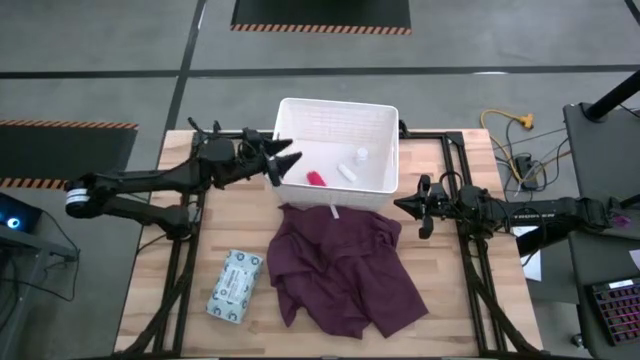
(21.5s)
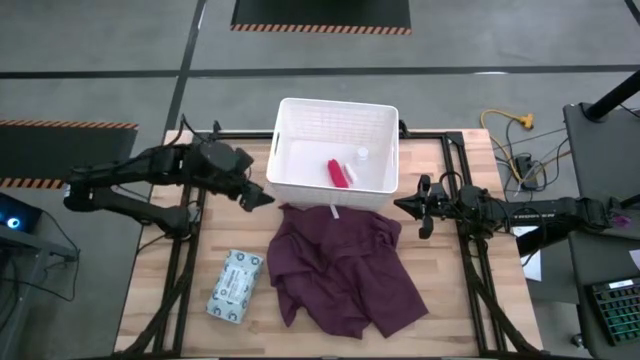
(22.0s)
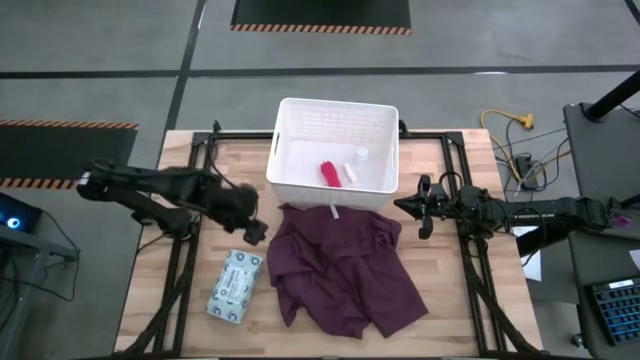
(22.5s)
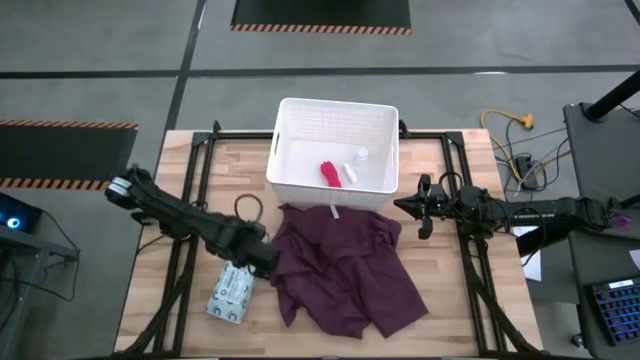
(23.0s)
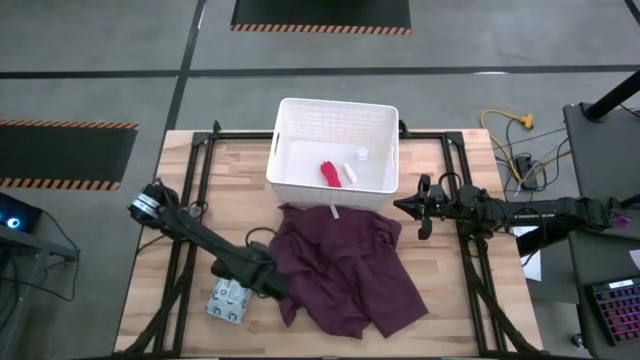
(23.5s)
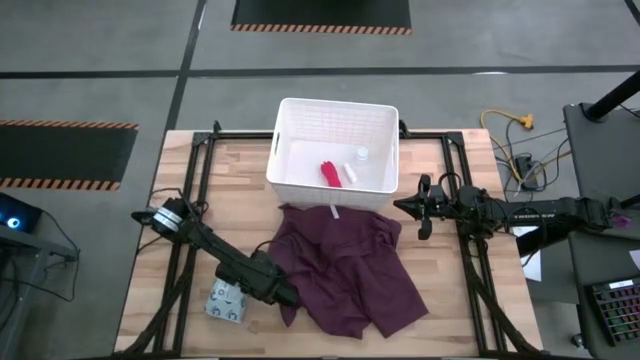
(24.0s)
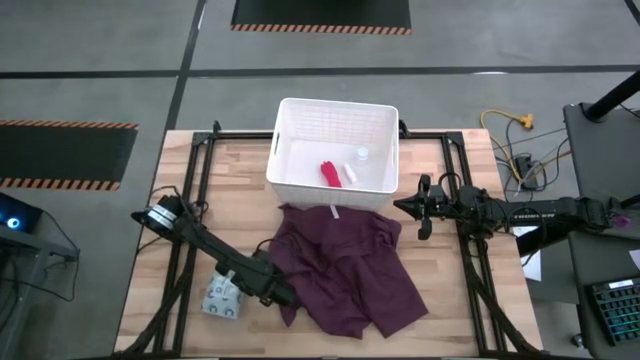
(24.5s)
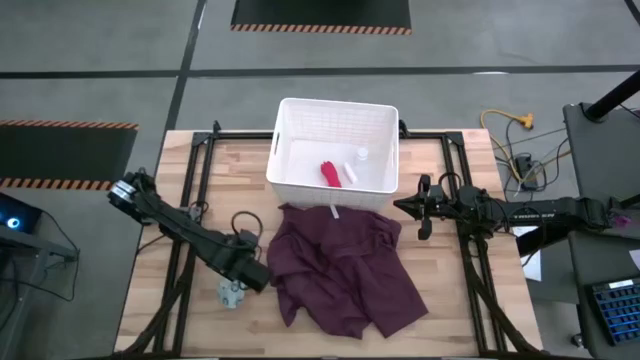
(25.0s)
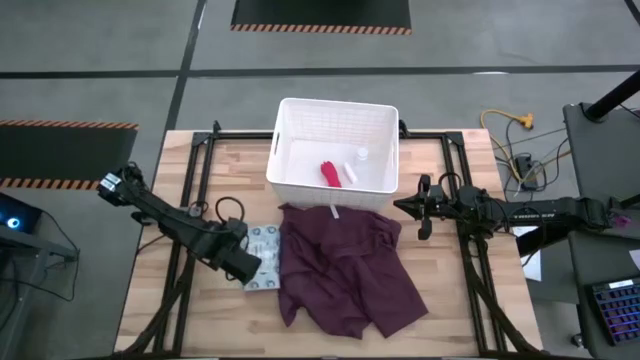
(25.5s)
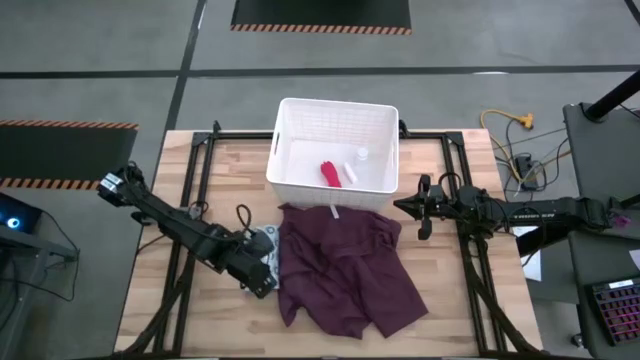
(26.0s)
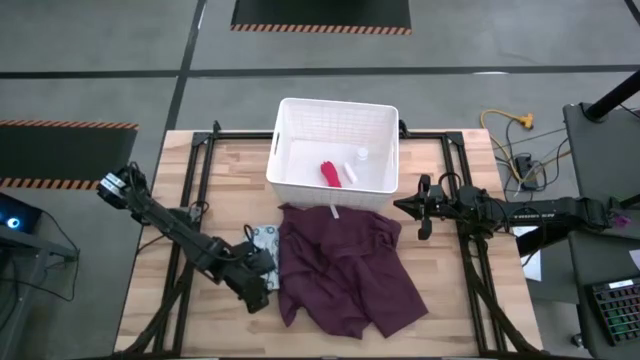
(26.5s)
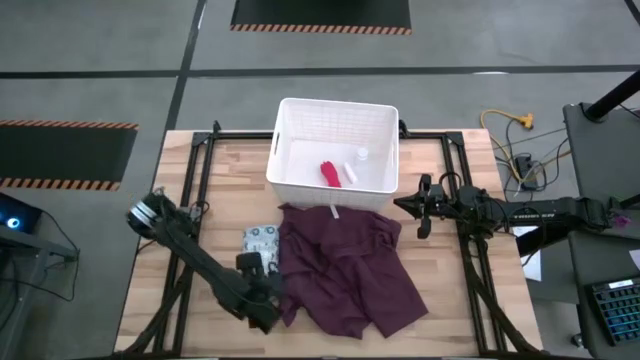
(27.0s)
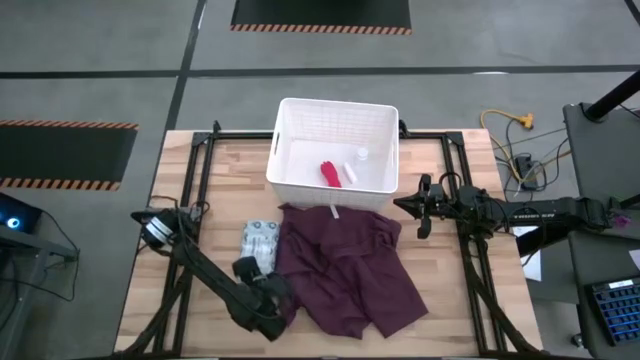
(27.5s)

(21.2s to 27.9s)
Task: Pick & place medical supplies in basket/bin
Put the white mailer bag into the basket

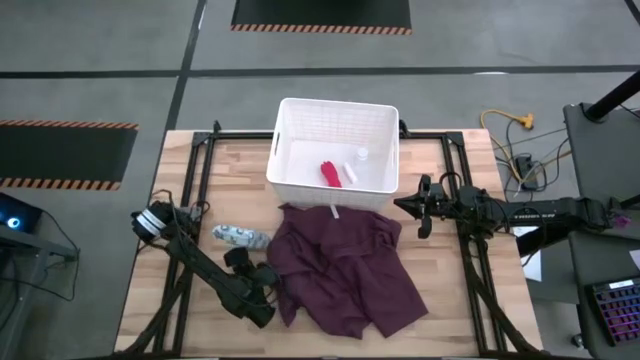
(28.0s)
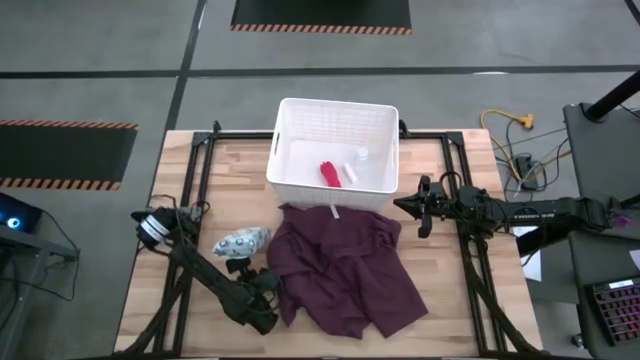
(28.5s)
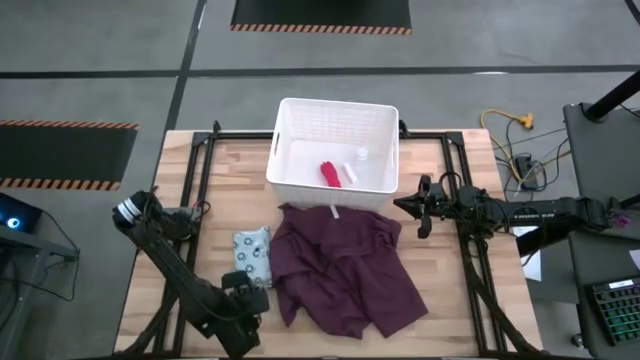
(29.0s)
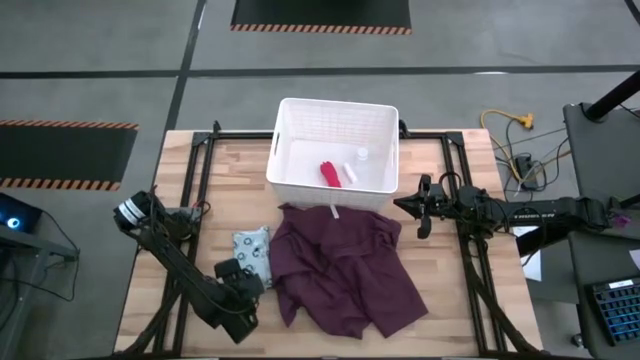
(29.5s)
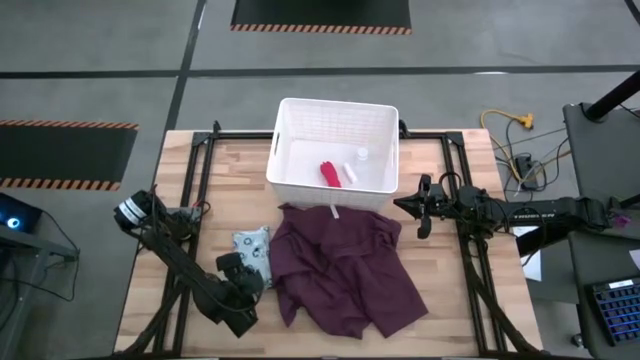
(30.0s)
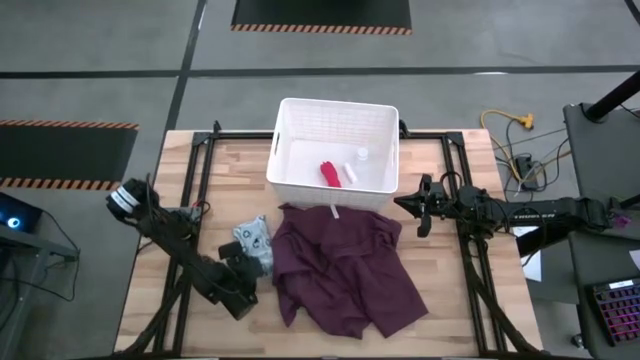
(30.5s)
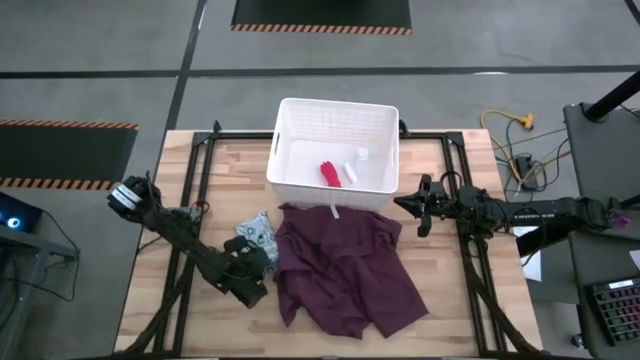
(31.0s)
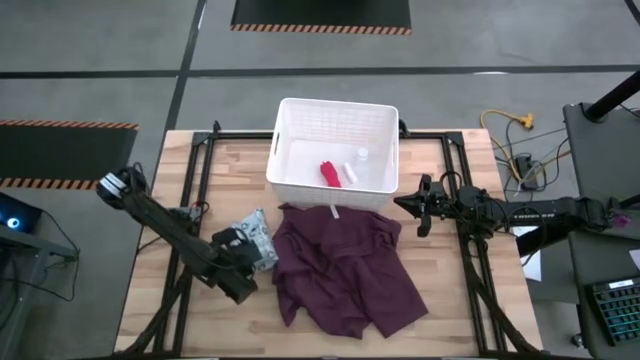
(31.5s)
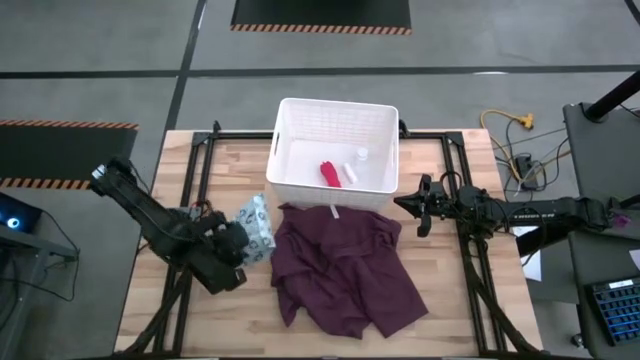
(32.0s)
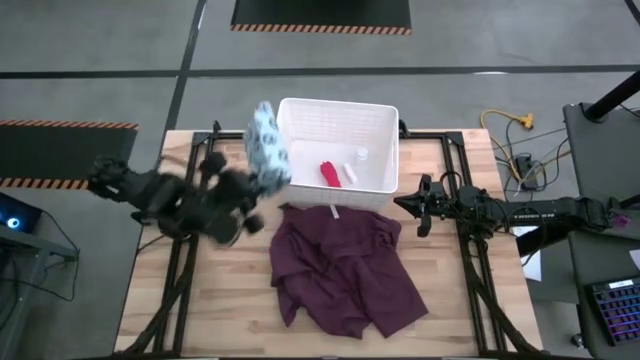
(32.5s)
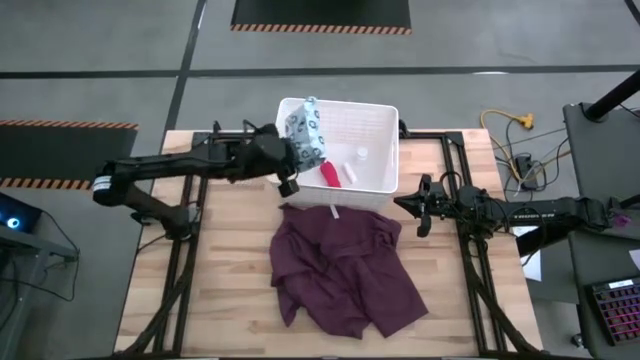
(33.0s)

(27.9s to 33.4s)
Put the white mailer bag into the basket

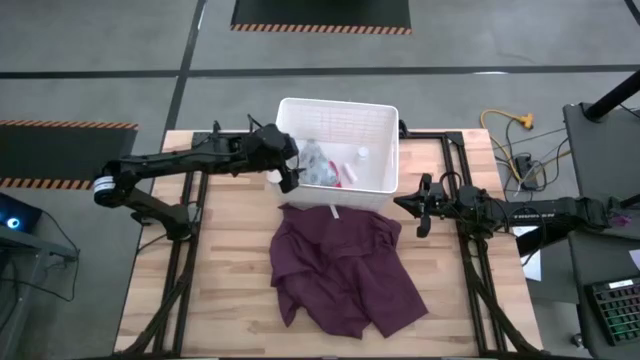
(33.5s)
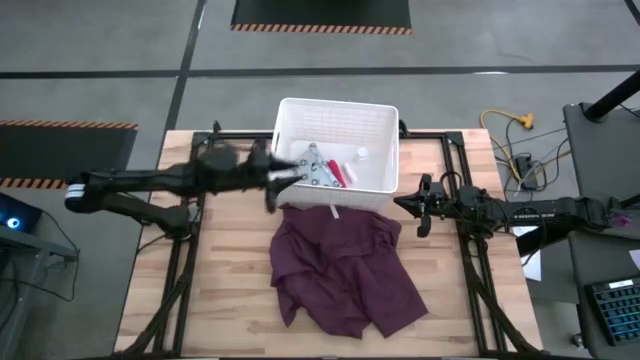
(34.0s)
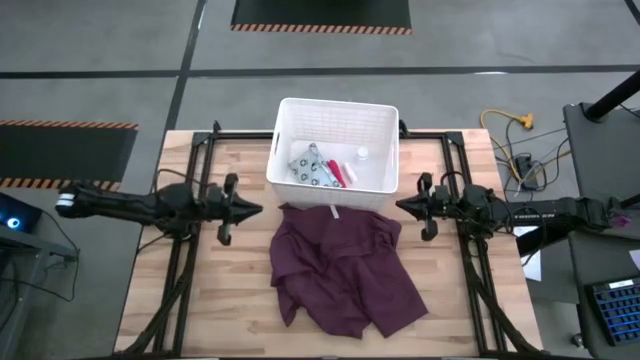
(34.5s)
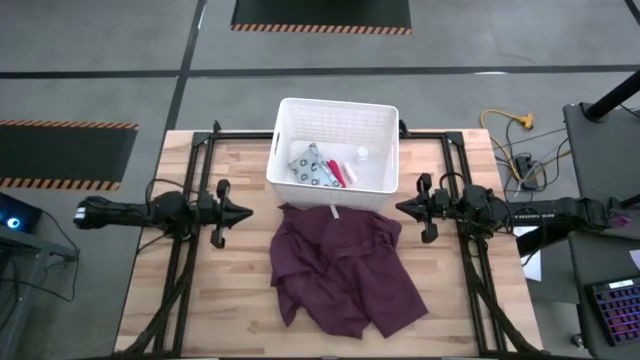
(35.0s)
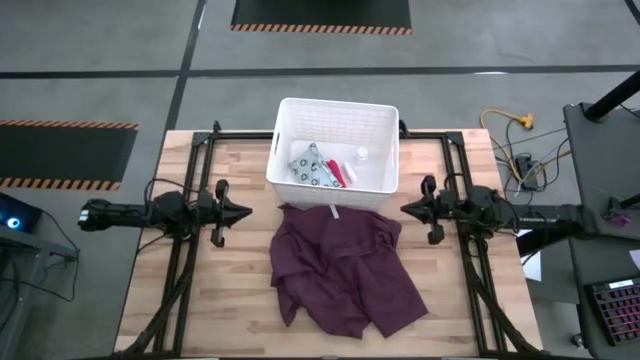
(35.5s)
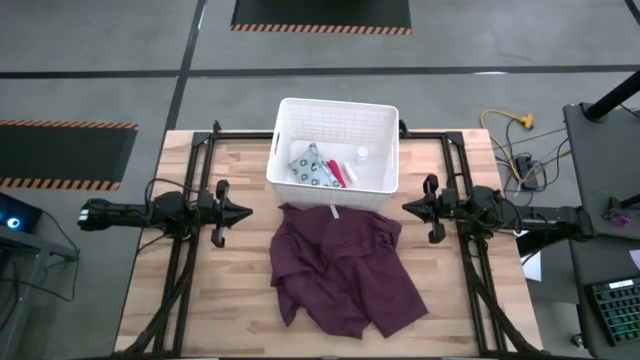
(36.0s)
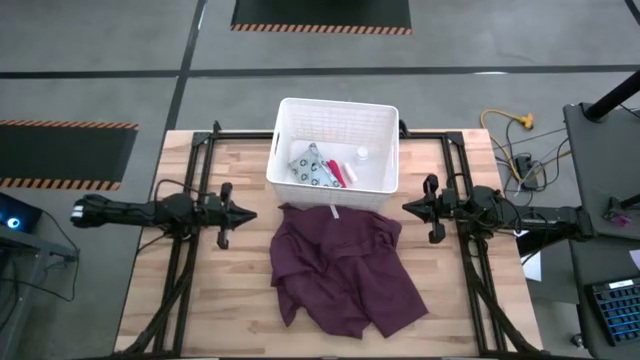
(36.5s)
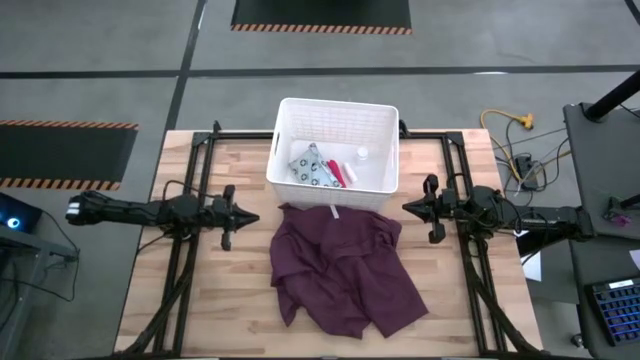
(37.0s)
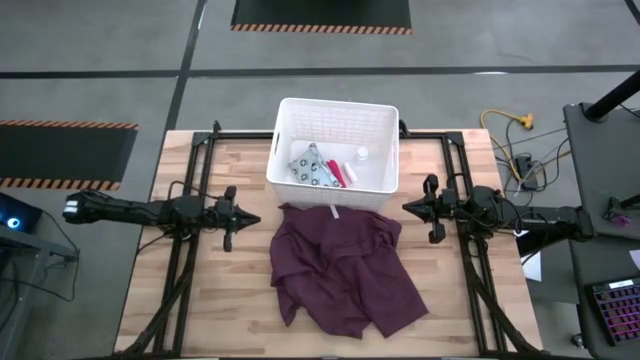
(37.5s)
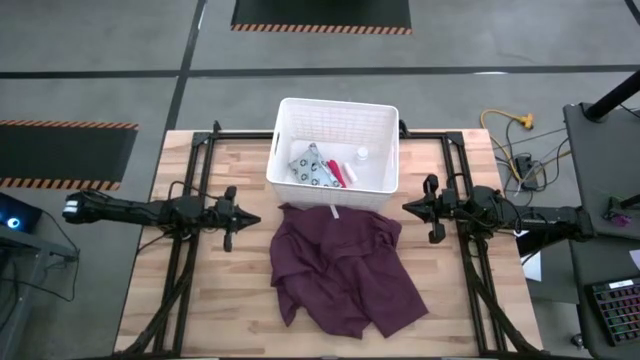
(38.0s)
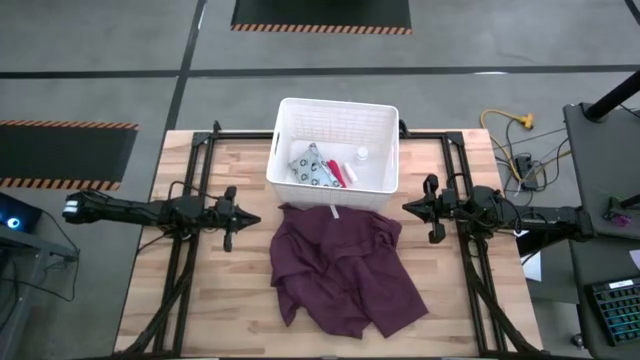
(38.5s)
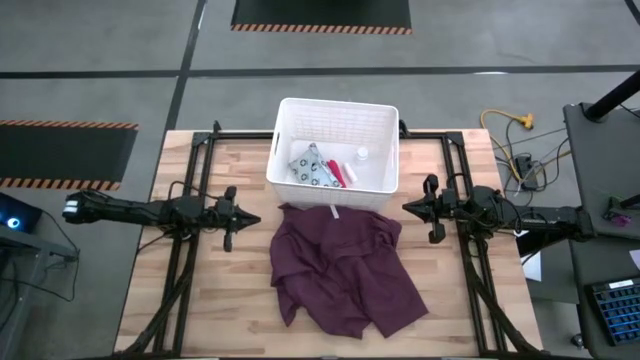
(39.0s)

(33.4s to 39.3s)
Return to Home Position

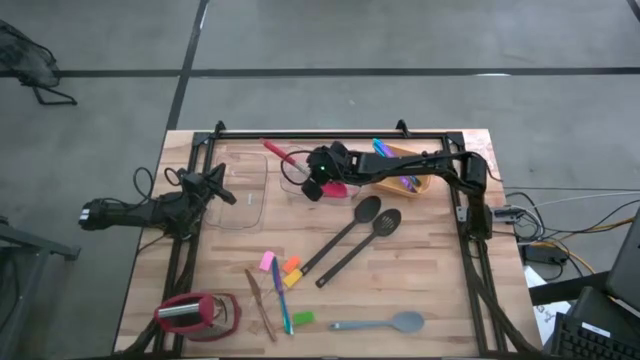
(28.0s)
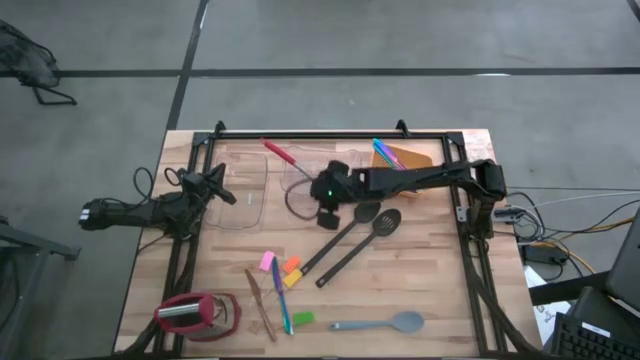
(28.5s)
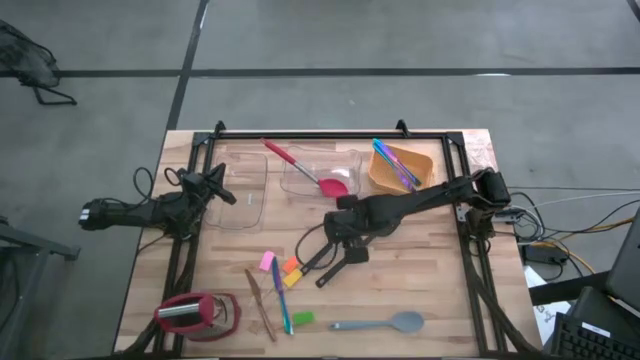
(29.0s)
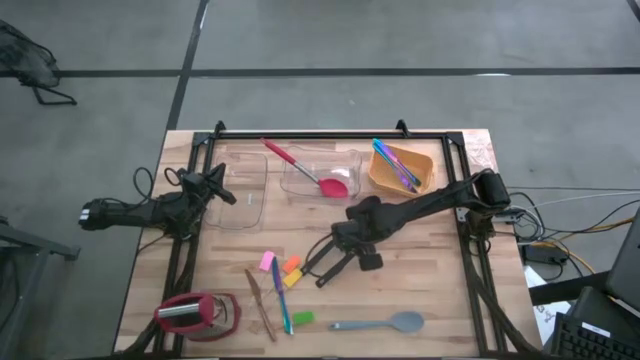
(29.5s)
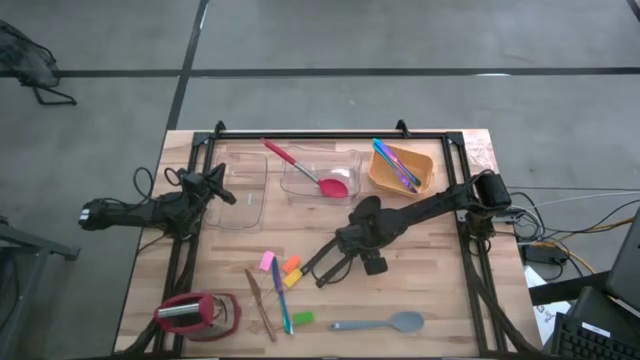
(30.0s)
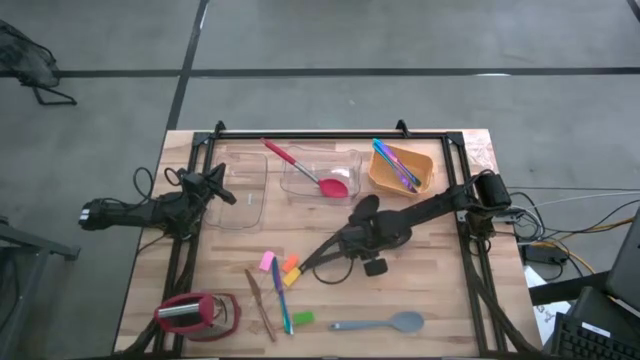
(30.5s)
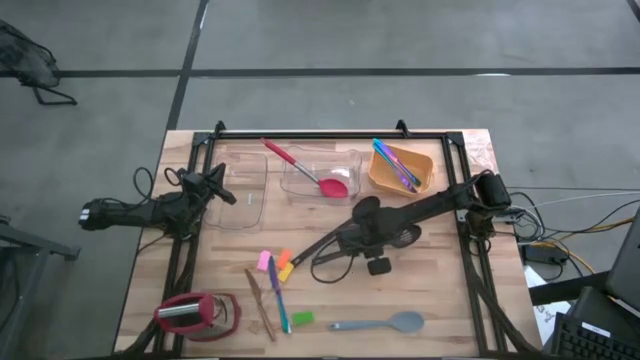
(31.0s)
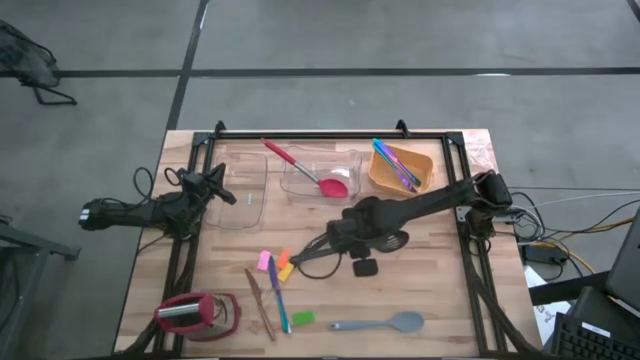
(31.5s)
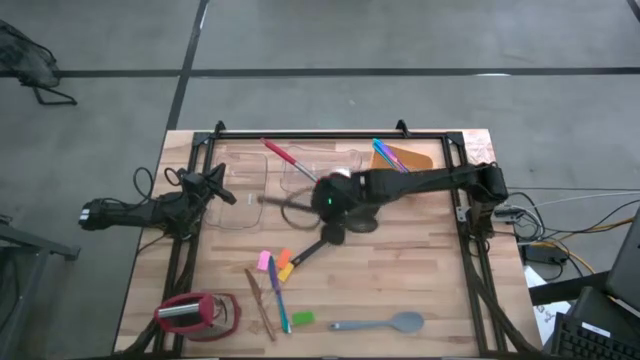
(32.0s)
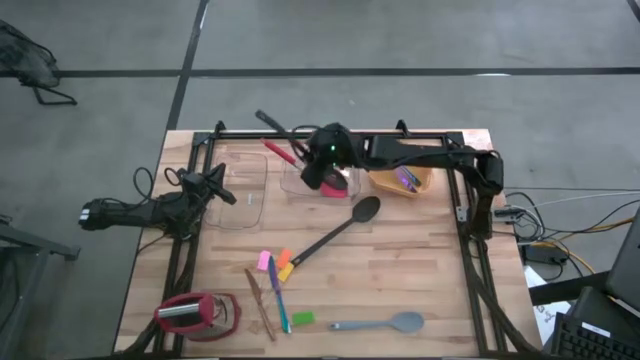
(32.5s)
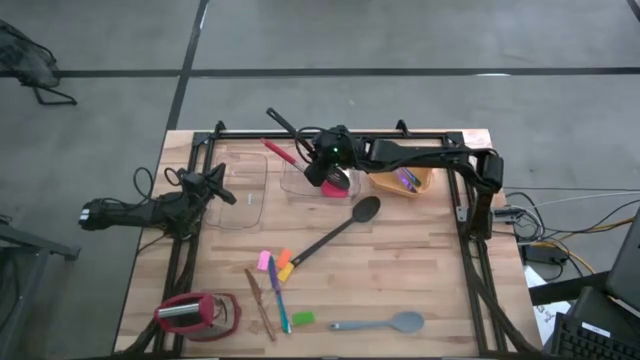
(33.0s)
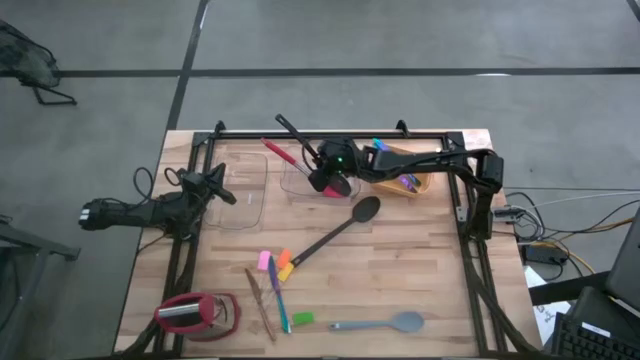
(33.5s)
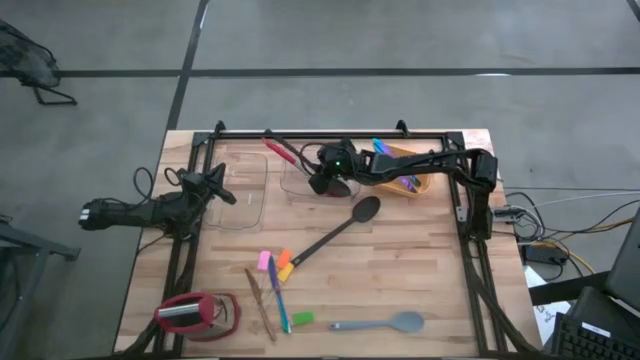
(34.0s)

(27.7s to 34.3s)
Task: Sort silverware by color (type)
Put the bottom black serving spoon into the right transparent bin
